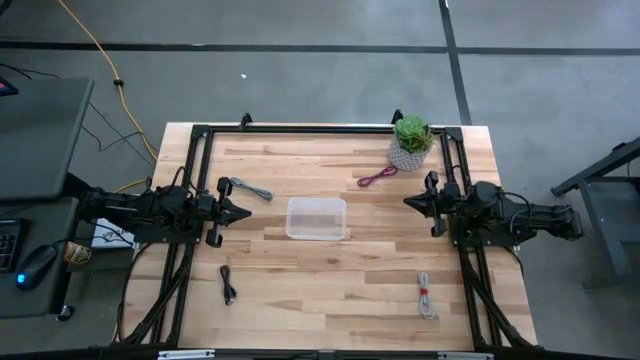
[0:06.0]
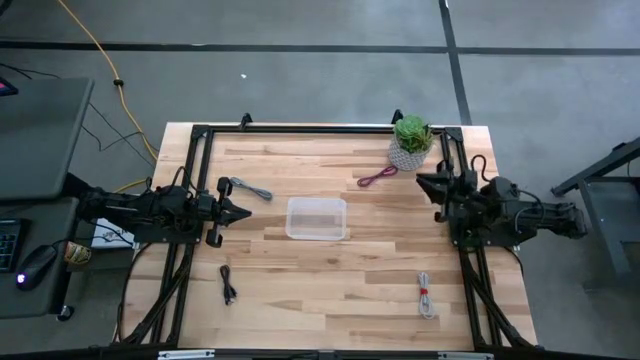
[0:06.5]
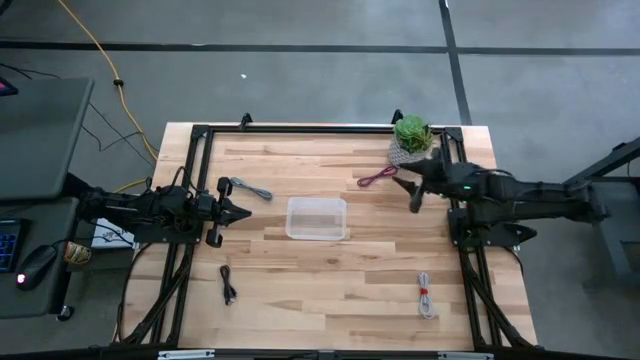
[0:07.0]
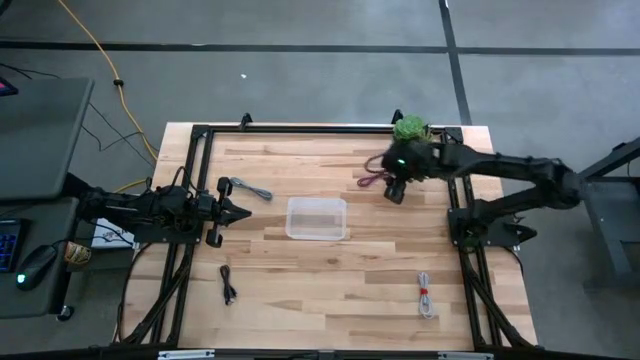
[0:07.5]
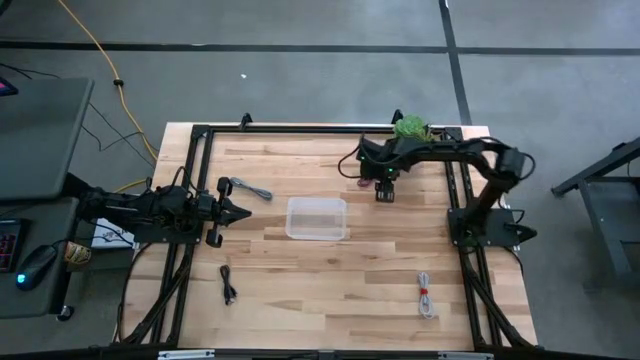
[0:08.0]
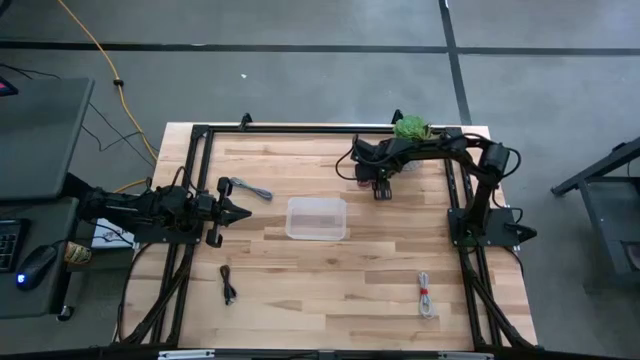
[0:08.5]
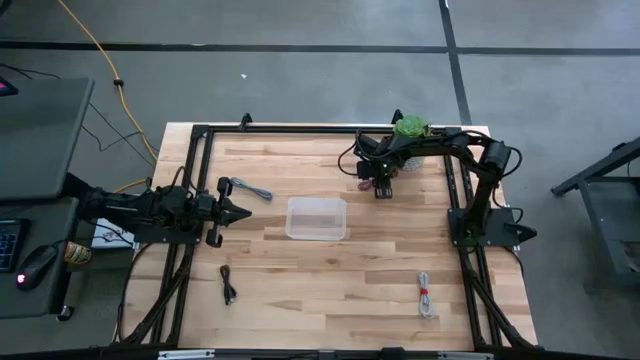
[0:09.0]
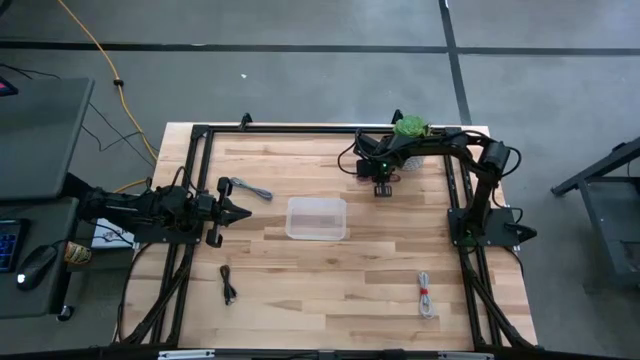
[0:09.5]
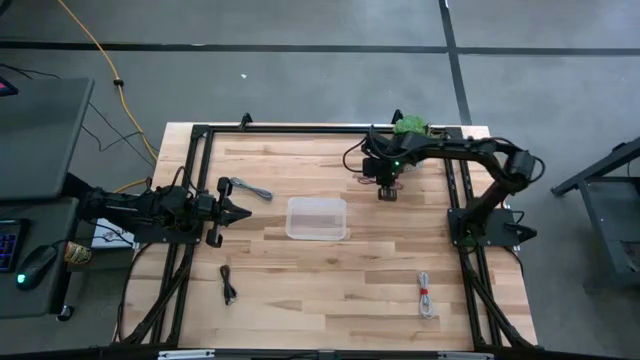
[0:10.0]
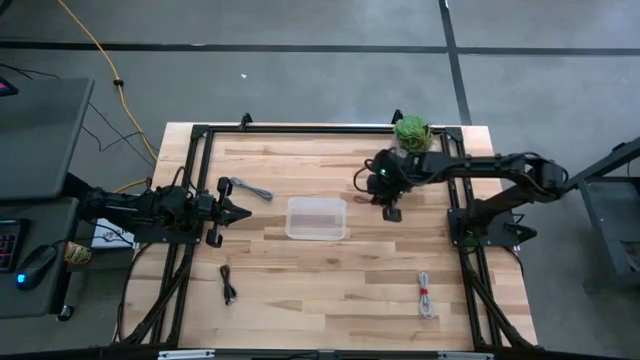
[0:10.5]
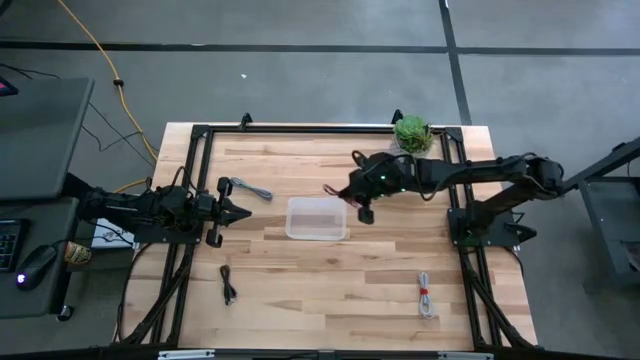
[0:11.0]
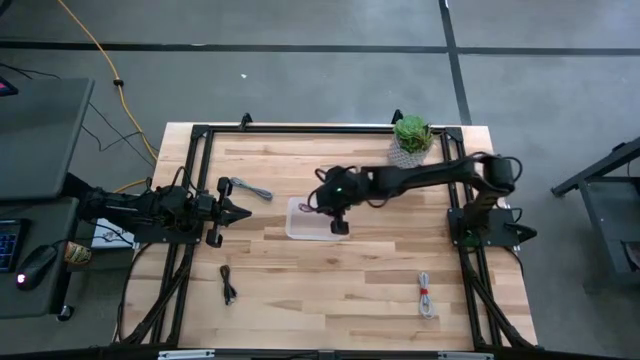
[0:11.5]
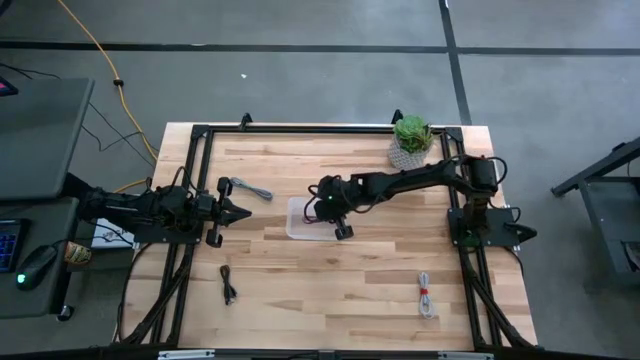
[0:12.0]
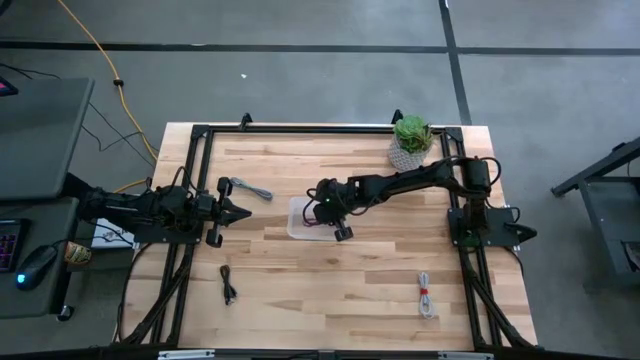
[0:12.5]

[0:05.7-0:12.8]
Task: Pick and place USB-C Cables
Put the red charger cable into the transparent bin

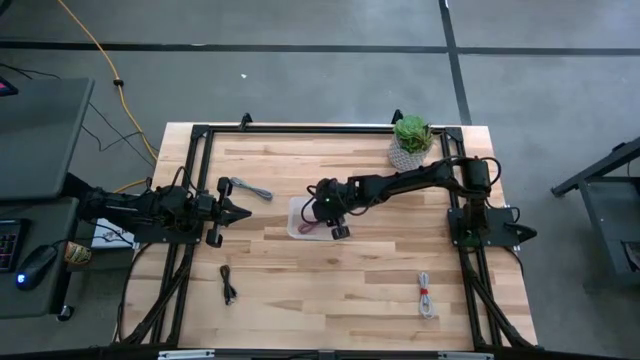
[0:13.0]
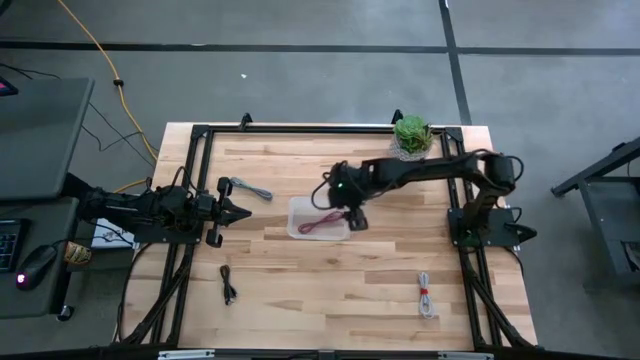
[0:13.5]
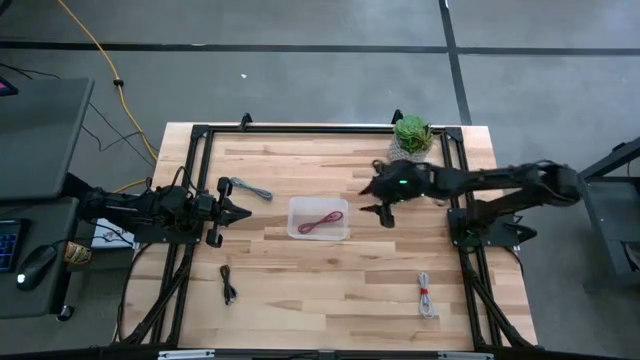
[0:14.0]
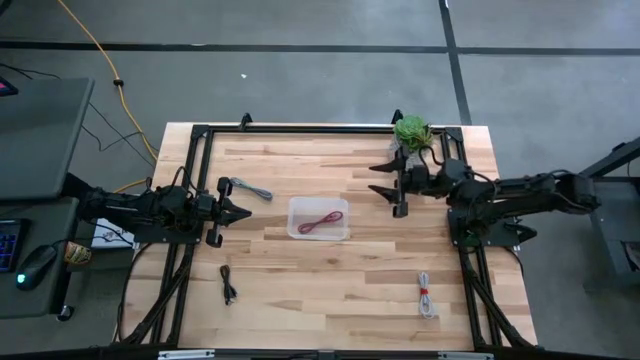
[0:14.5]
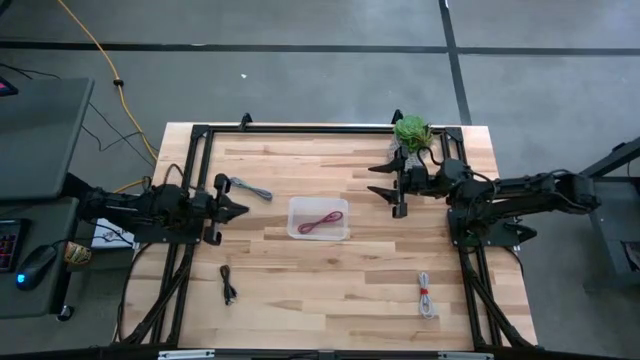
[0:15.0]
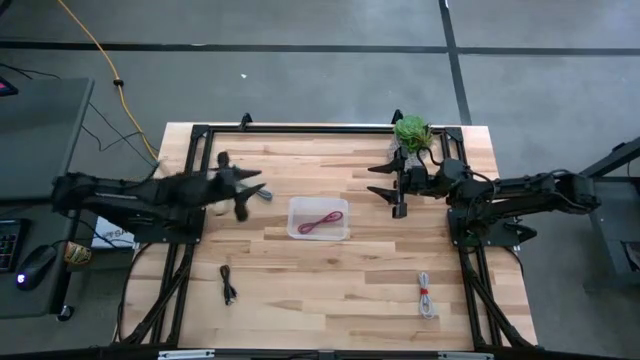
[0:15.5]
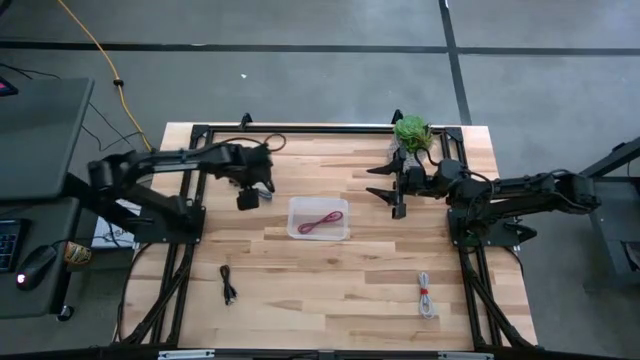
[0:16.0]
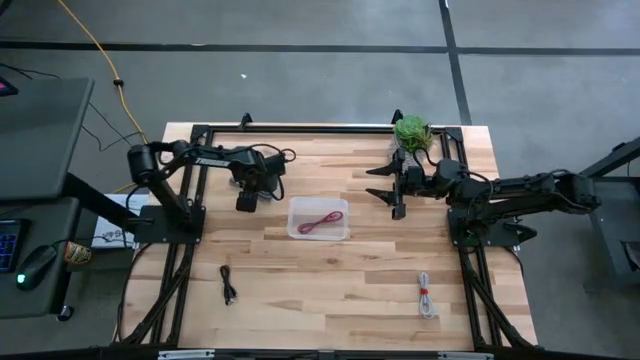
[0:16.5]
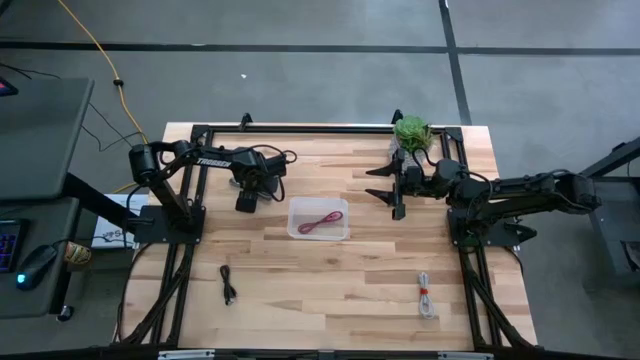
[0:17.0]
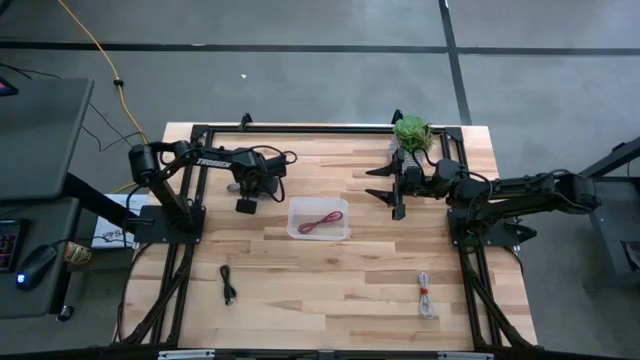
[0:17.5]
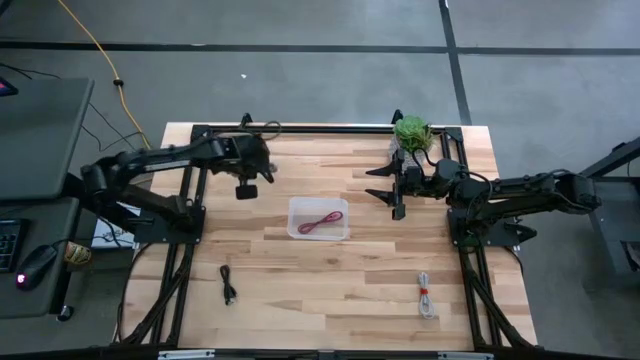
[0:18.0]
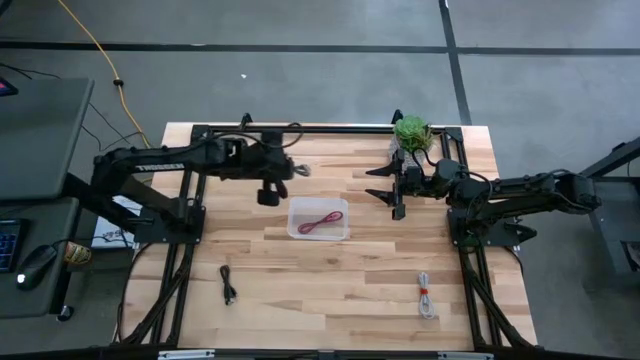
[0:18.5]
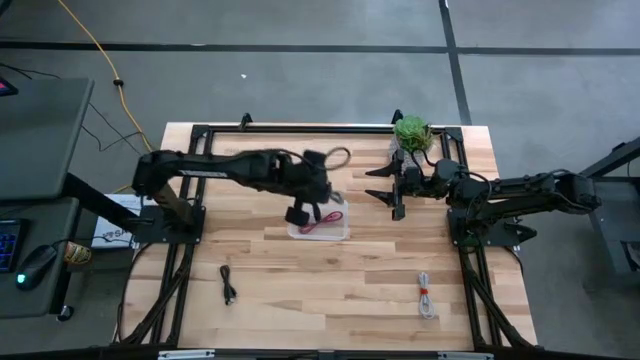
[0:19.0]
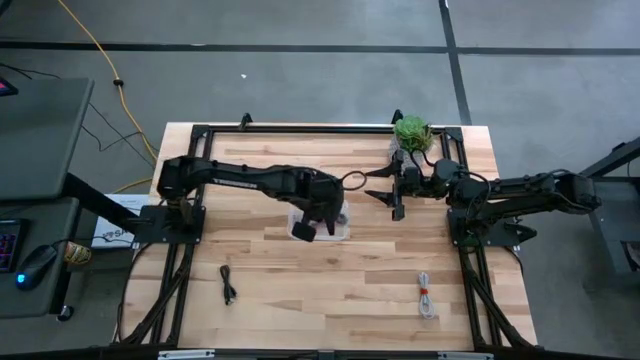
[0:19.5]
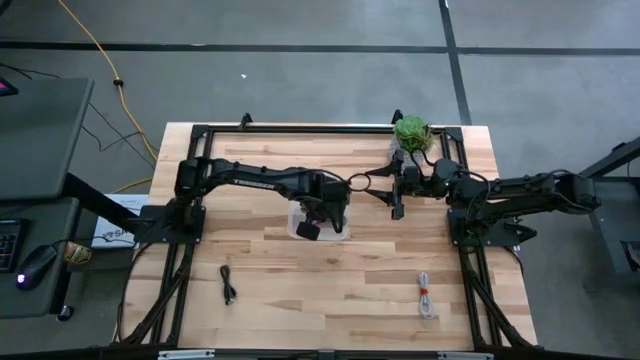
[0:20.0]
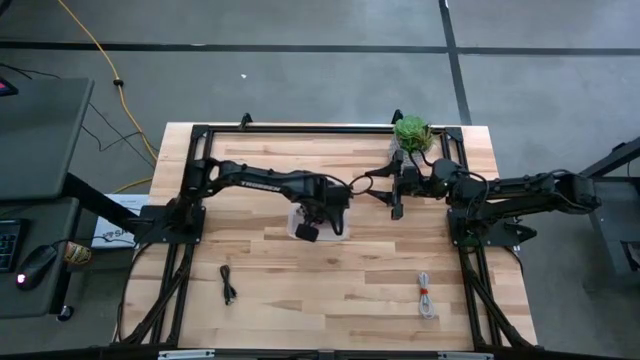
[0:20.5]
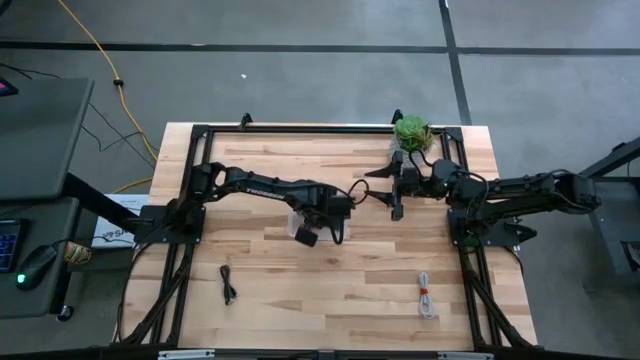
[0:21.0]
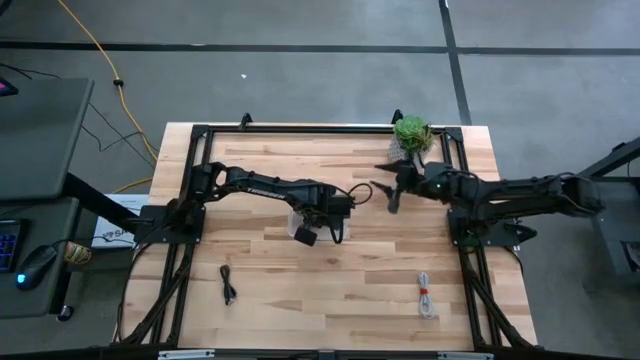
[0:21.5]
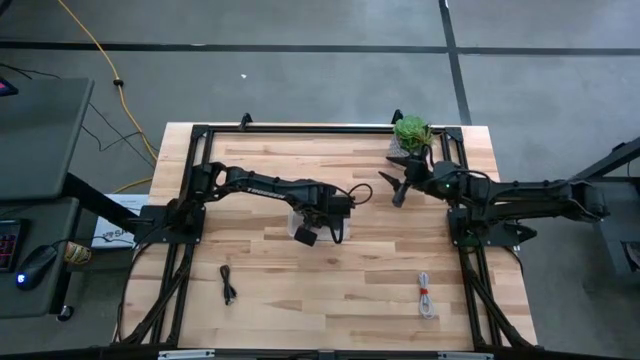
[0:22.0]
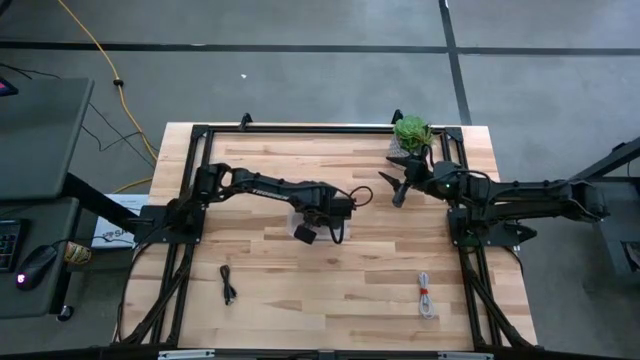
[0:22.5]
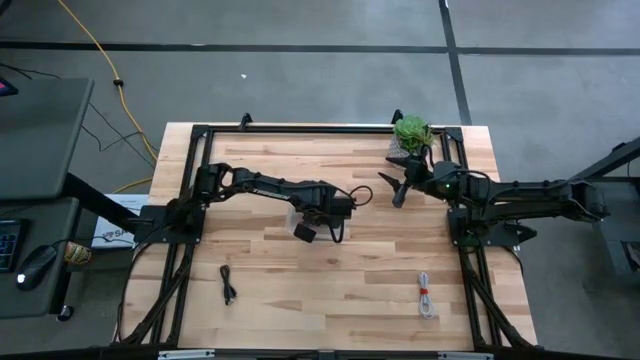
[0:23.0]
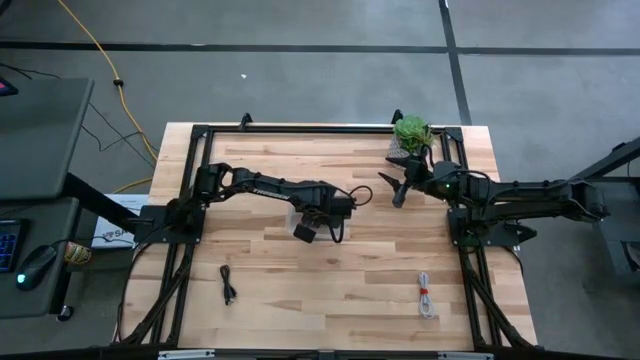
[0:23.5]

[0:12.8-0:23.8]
Put the gray charger cable into the transparent bin

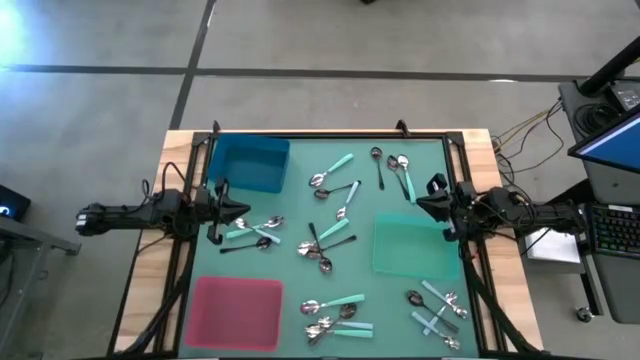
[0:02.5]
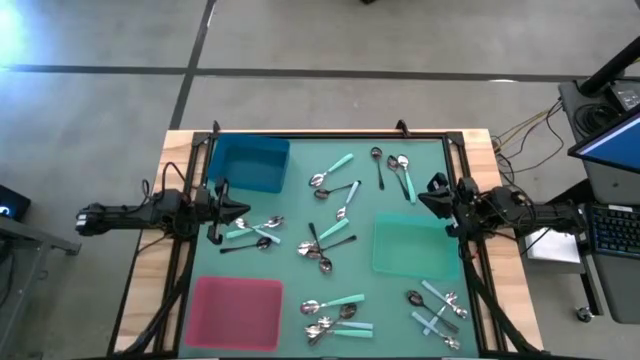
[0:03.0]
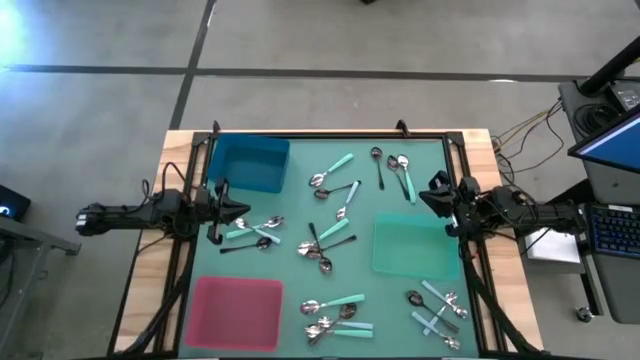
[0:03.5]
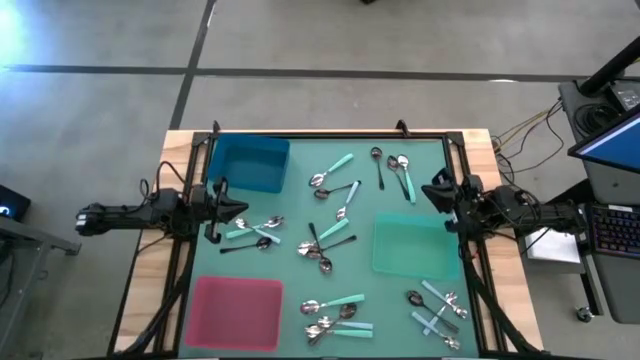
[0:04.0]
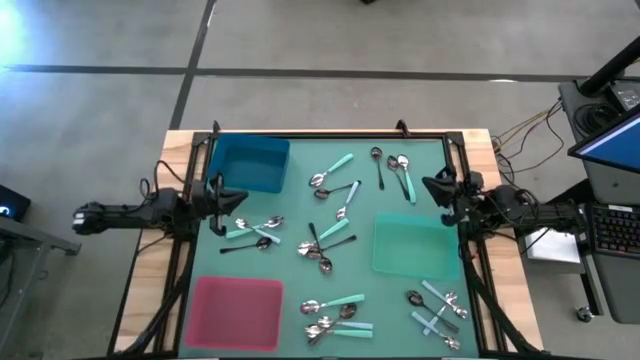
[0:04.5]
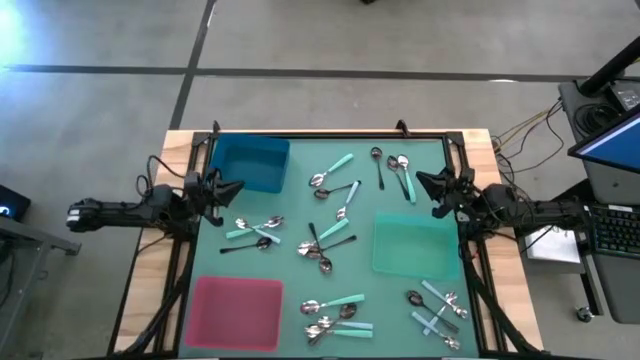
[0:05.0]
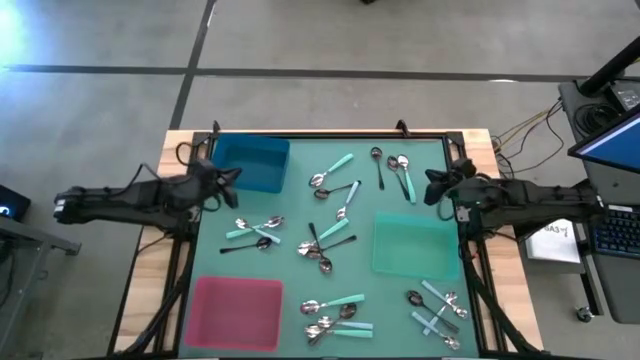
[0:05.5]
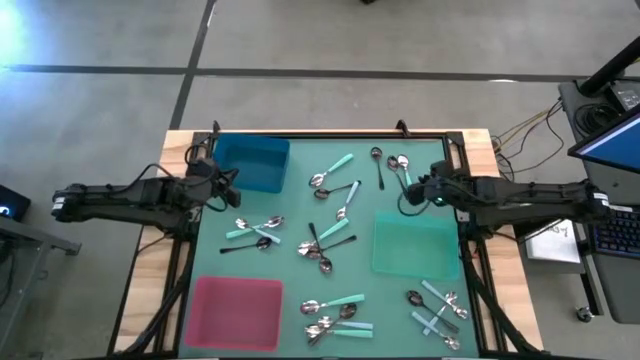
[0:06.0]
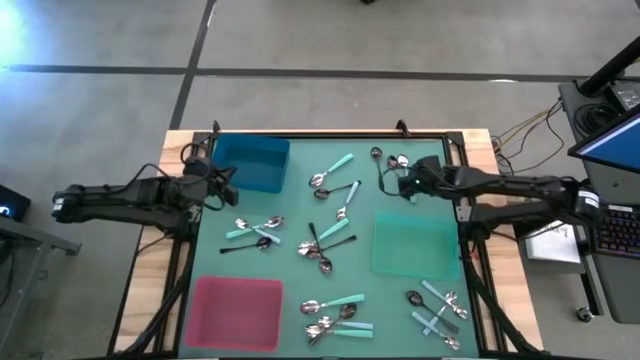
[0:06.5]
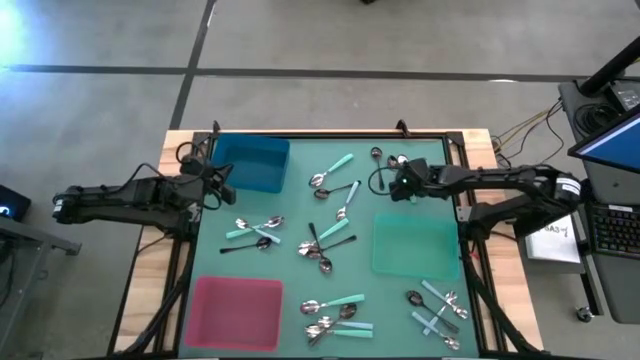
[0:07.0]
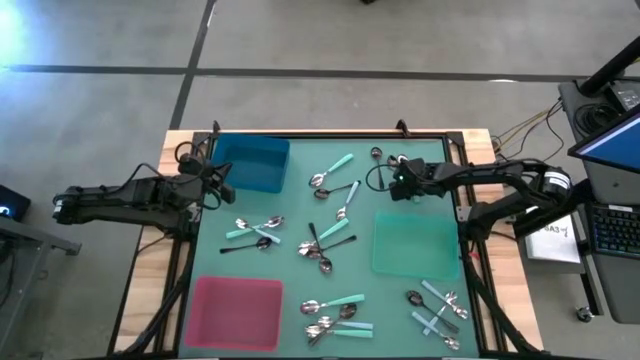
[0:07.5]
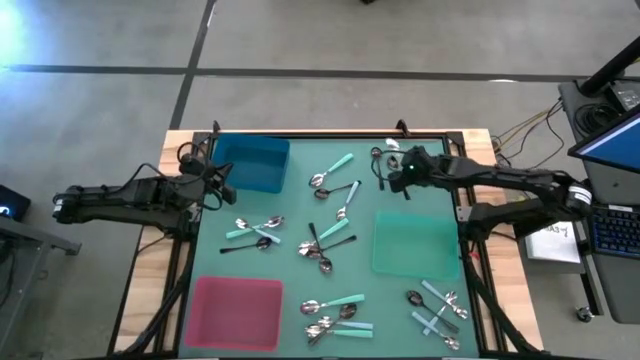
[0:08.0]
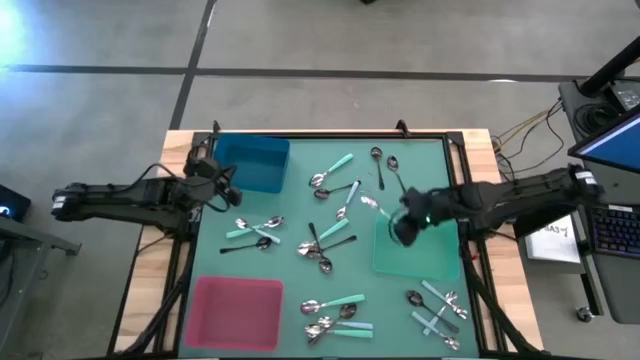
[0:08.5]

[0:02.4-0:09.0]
Task: Sort silverware by color (type)
Put the green spoon into the green bin
